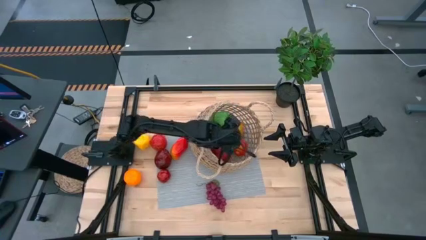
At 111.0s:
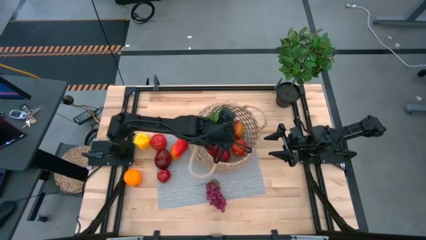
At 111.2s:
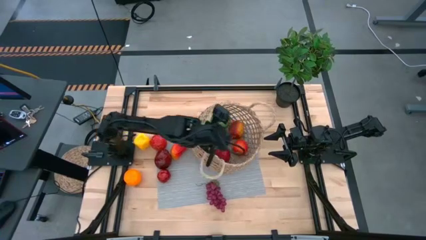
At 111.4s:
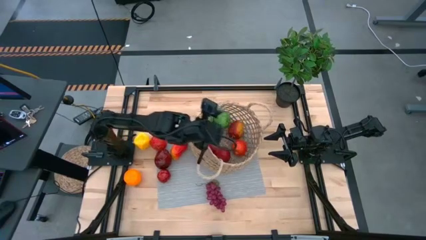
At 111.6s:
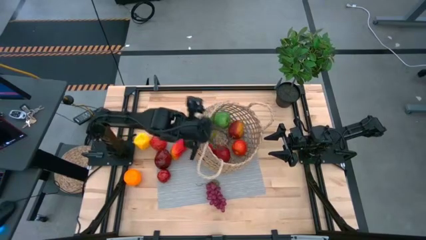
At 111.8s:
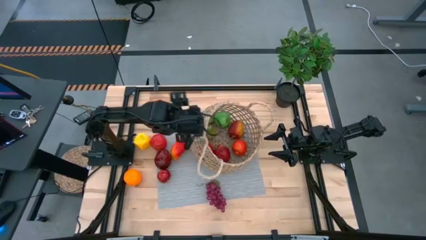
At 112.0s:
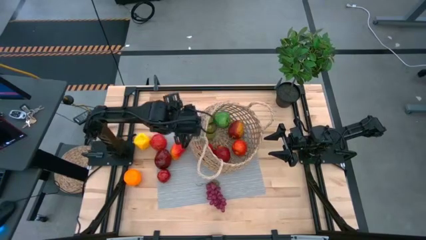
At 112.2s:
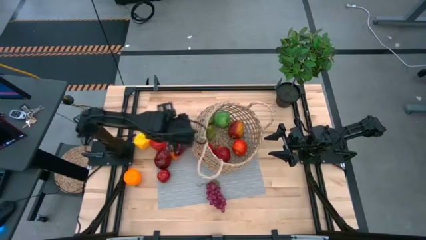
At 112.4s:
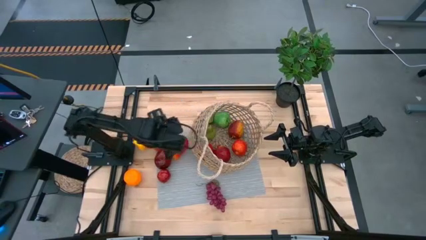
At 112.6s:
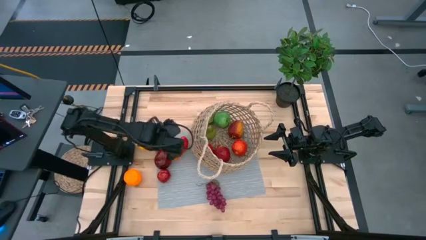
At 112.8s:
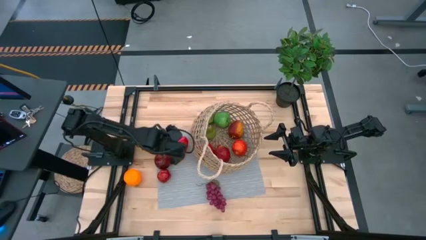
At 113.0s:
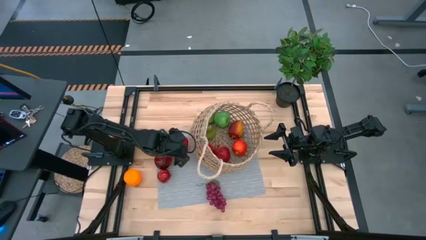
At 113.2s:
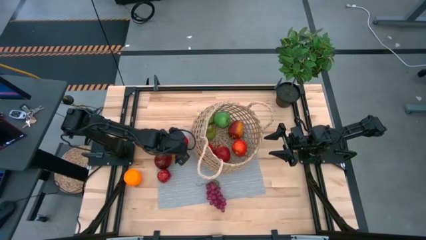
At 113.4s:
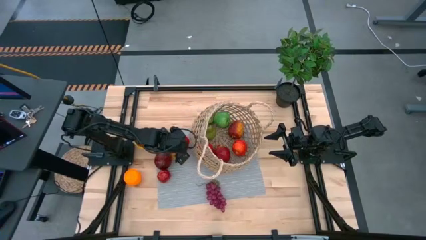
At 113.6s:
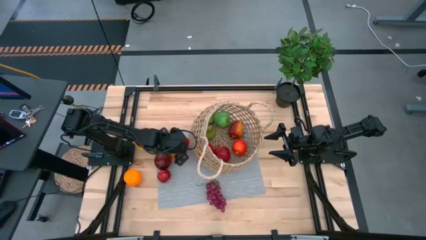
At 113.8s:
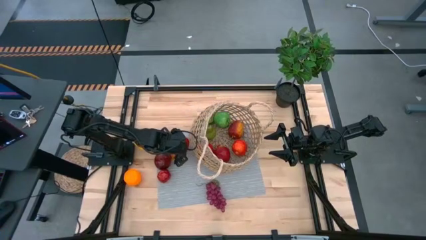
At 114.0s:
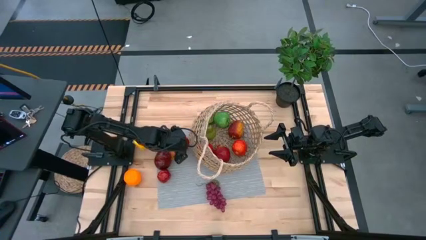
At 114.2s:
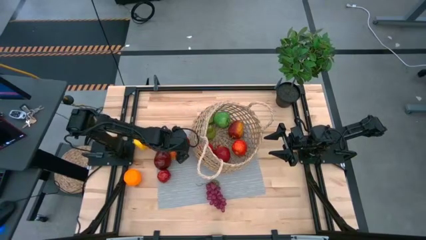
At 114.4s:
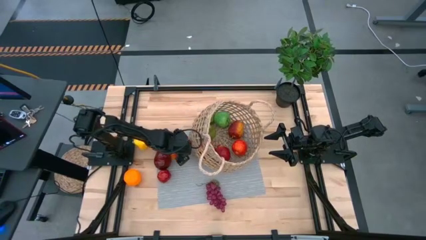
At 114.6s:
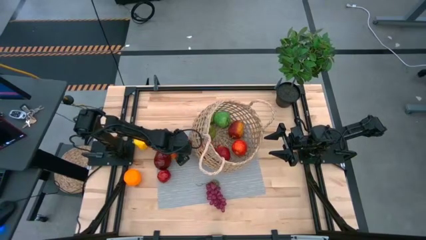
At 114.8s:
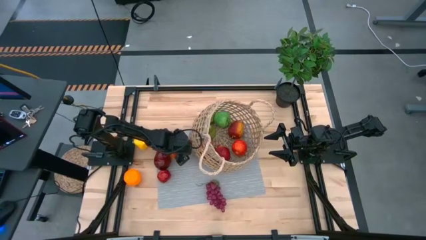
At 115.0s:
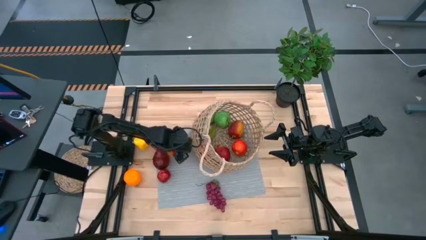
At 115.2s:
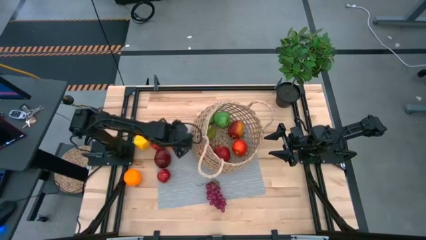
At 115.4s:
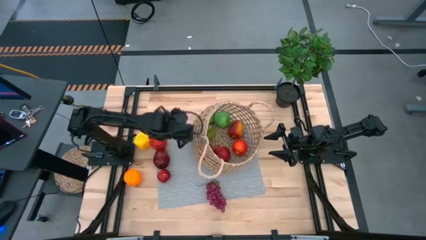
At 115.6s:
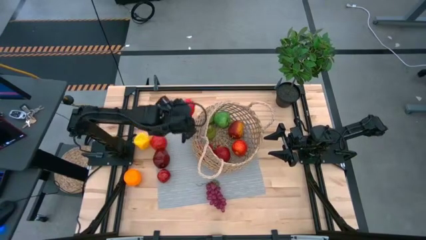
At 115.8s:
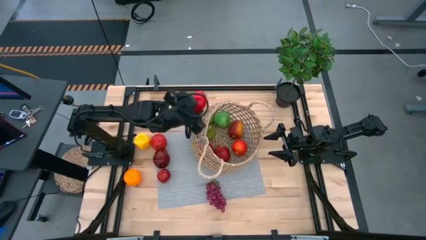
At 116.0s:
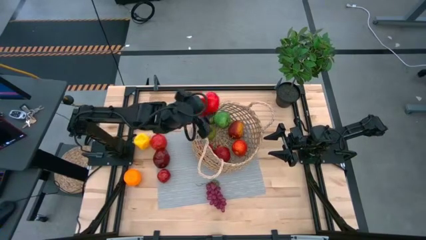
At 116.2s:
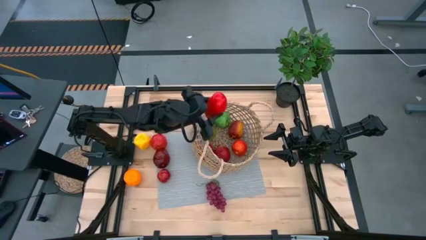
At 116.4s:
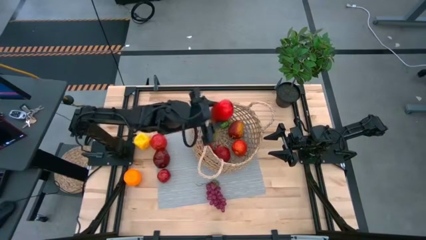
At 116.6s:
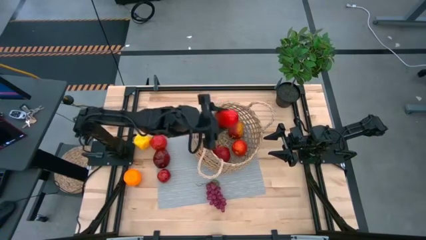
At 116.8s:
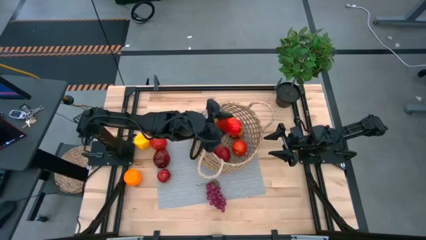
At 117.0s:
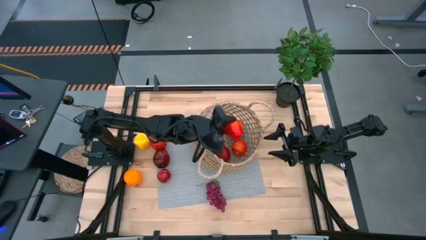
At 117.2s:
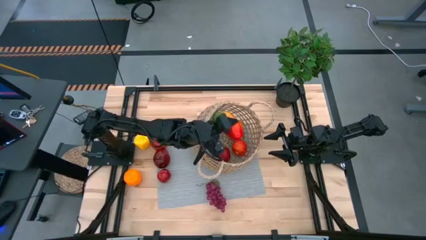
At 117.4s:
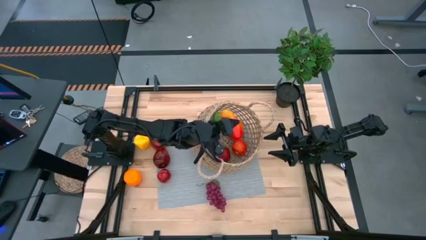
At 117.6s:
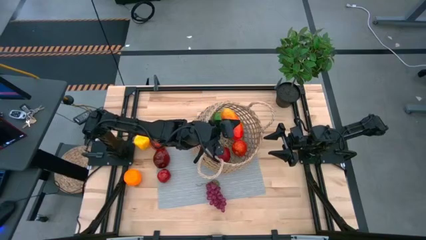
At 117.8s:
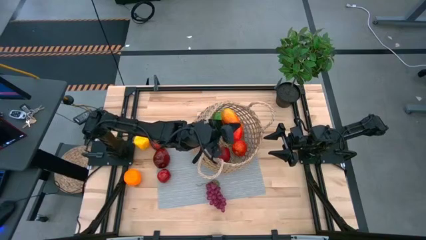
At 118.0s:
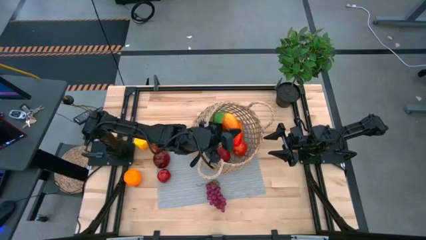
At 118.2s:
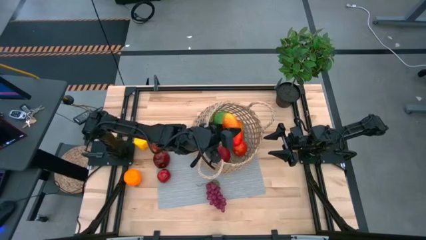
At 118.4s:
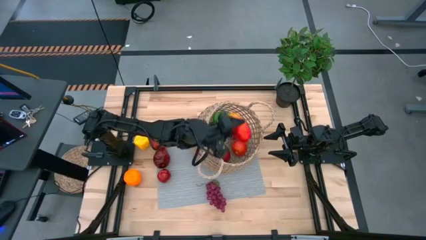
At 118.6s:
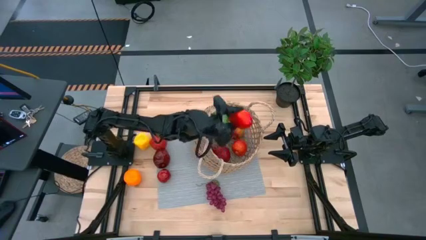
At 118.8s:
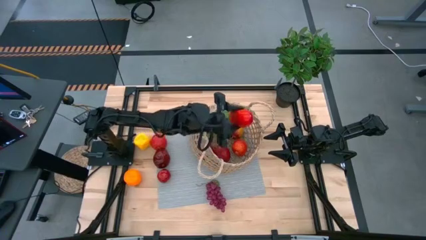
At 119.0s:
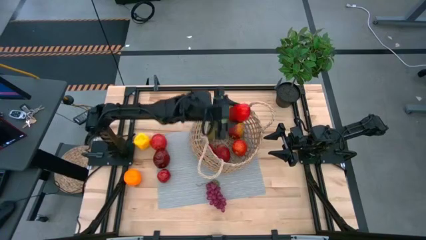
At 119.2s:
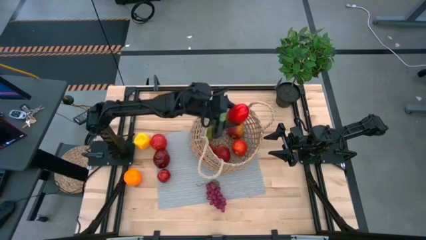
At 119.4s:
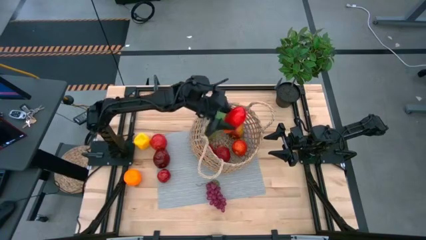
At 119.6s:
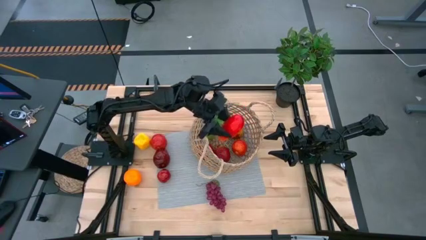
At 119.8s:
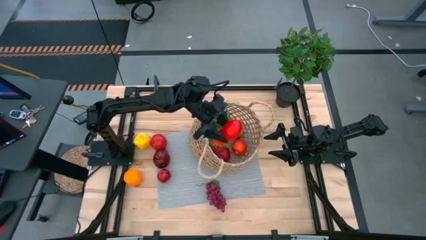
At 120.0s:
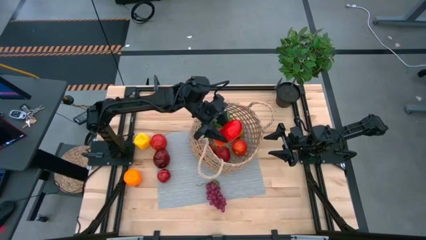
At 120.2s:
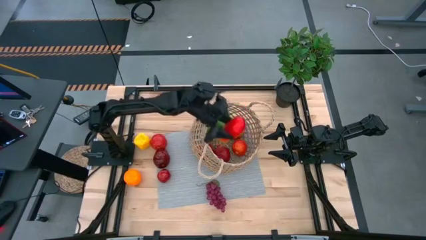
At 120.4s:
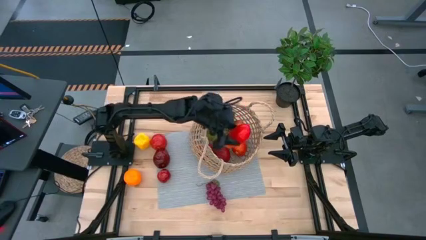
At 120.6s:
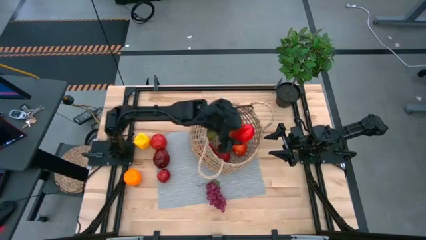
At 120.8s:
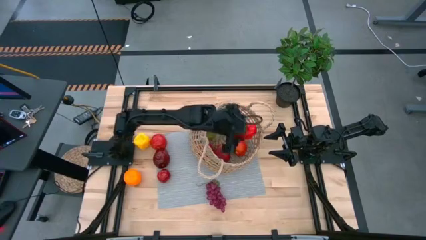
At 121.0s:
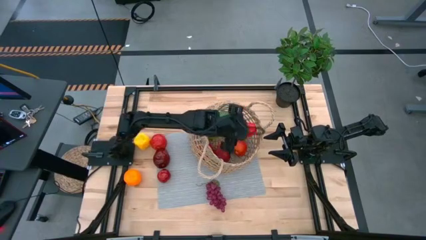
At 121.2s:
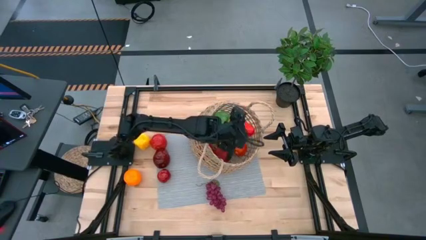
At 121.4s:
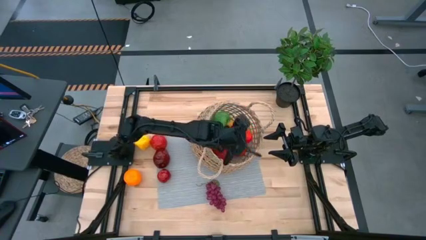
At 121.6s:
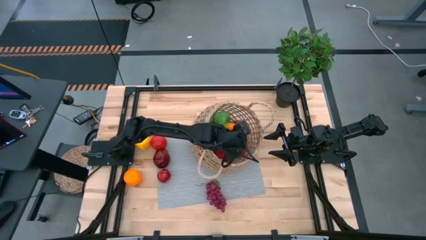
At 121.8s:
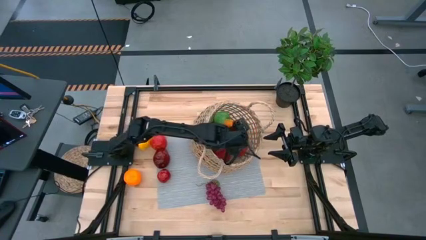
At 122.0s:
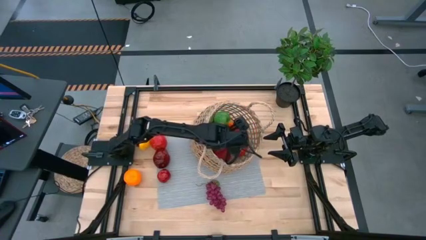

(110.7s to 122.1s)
Task: Build produce basket
Put the mango into the brown basket

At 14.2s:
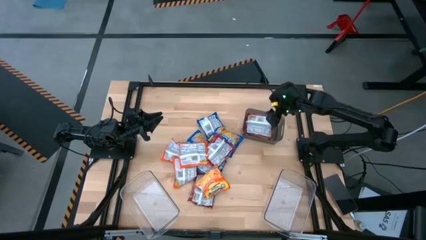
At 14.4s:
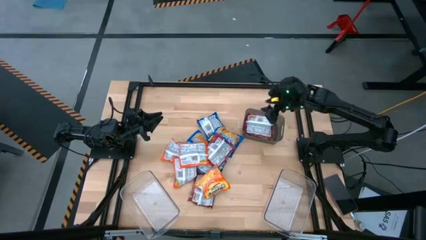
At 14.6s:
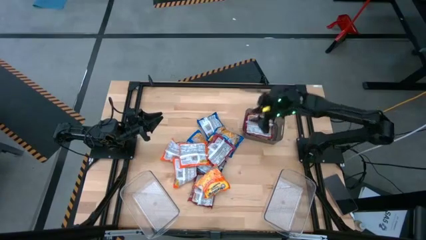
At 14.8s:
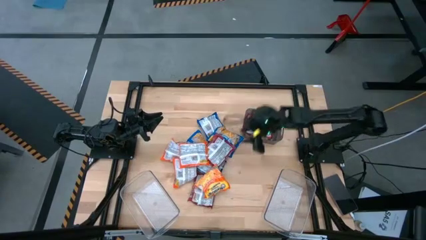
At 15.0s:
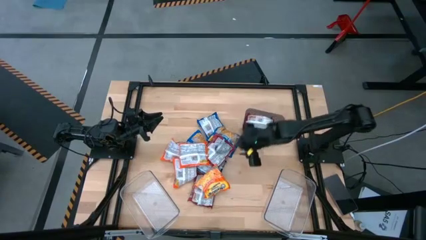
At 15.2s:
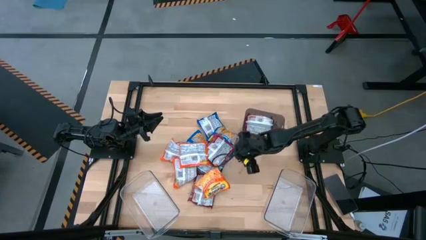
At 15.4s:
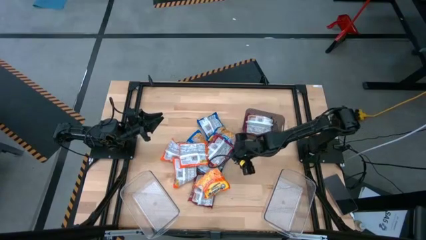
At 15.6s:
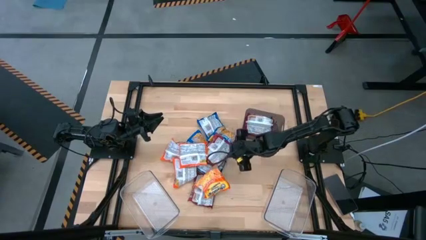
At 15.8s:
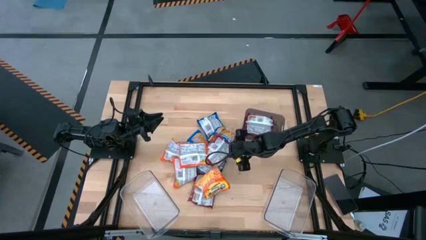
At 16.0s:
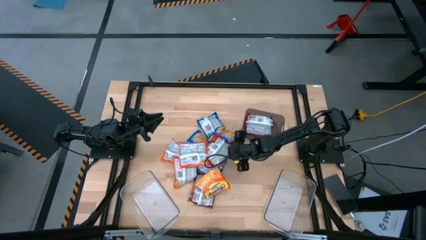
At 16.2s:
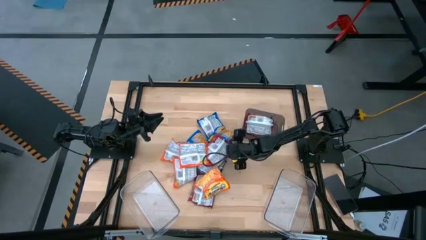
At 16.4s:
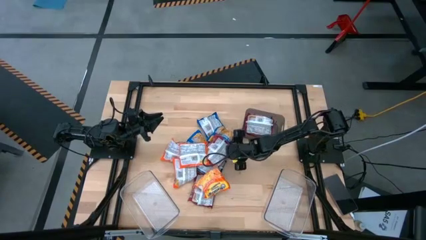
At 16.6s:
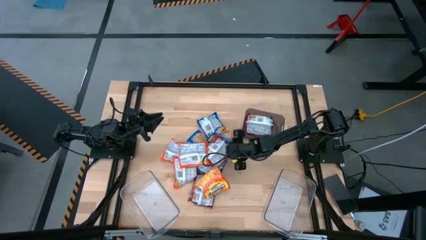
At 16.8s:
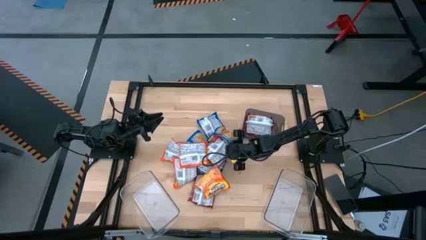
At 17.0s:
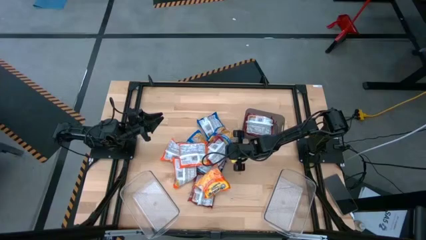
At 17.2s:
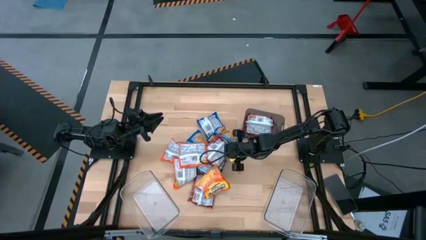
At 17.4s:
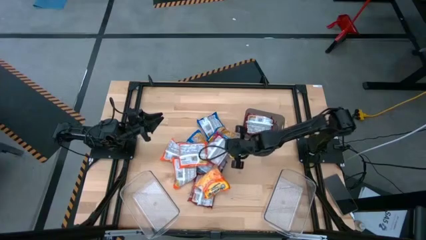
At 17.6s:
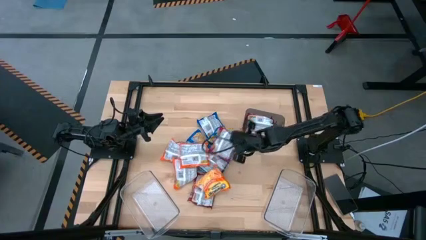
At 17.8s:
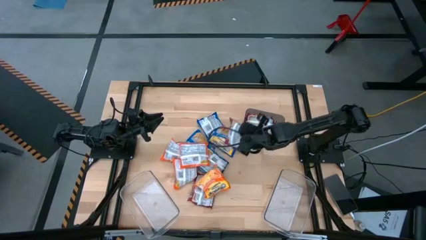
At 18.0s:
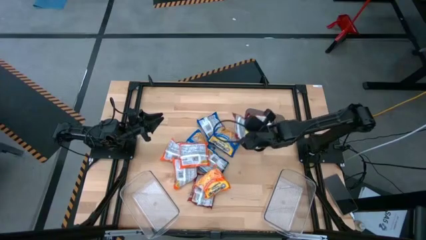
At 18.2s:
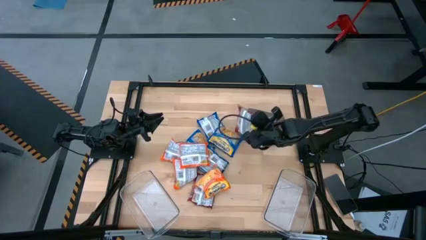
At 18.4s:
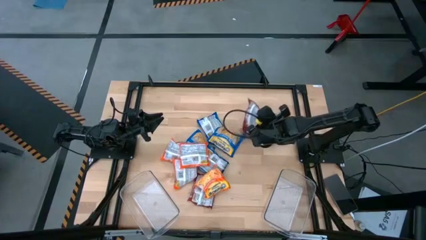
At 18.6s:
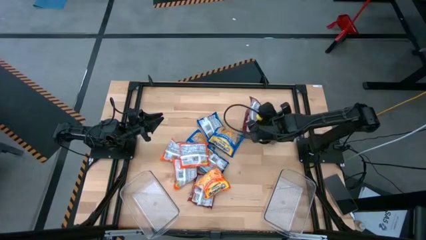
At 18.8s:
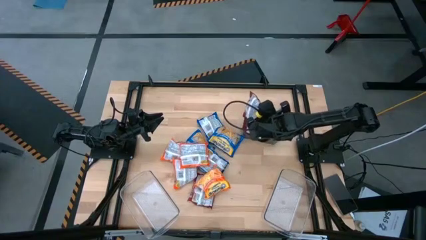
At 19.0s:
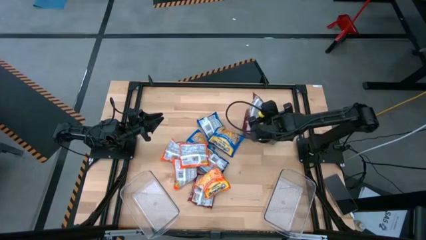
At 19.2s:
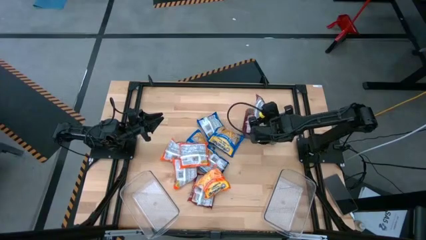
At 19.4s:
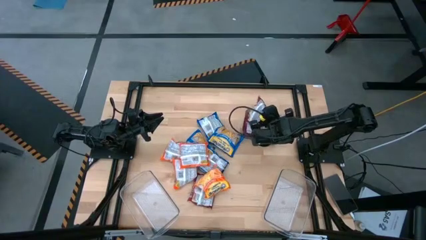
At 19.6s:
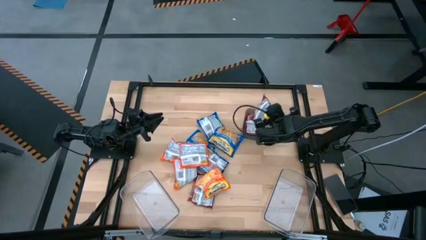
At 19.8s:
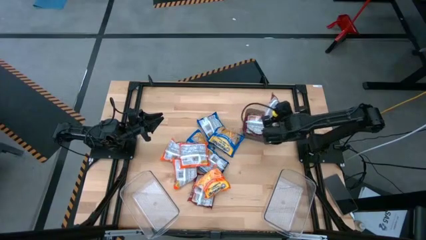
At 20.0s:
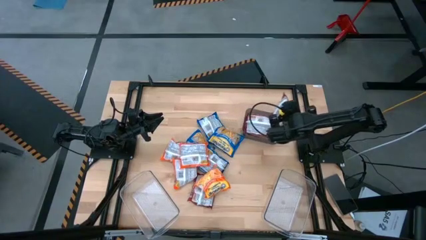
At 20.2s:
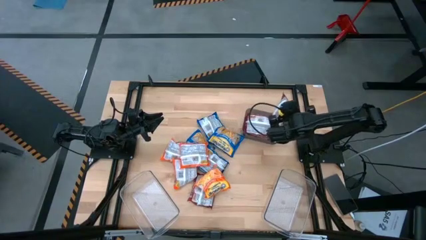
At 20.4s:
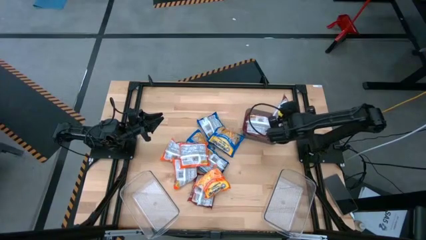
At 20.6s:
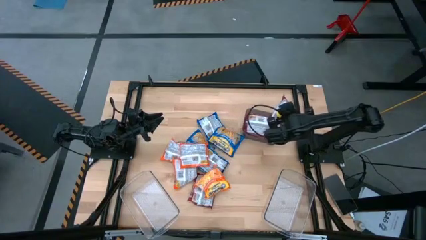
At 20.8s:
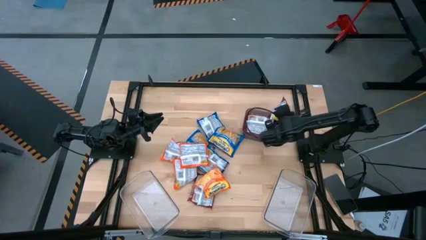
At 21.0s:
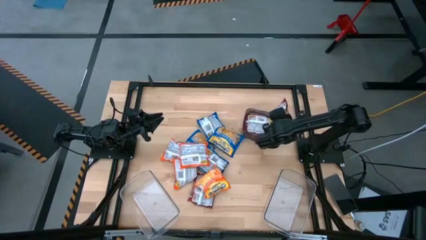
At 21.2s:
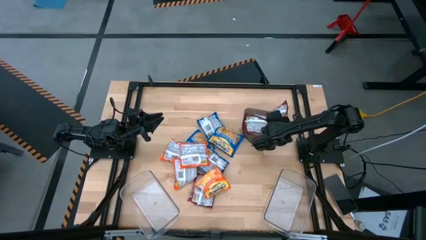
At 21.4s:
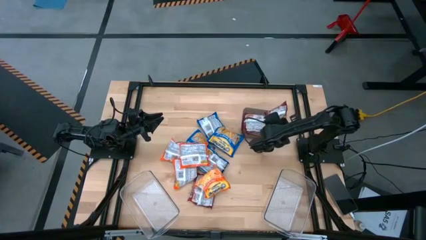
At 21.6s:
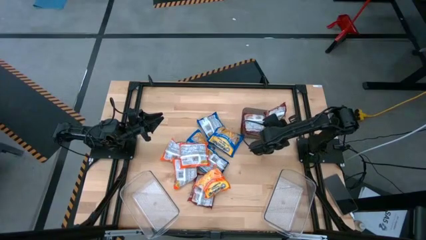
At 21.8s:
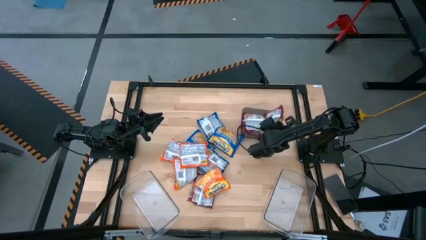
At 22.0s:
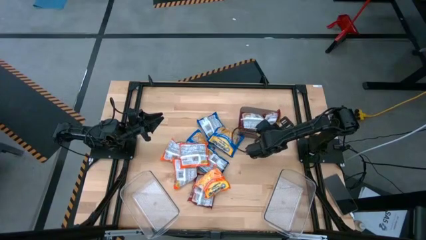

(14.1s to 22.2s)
Task: Sort Maruchan noodles
Put the red noodle pack into the black bin
